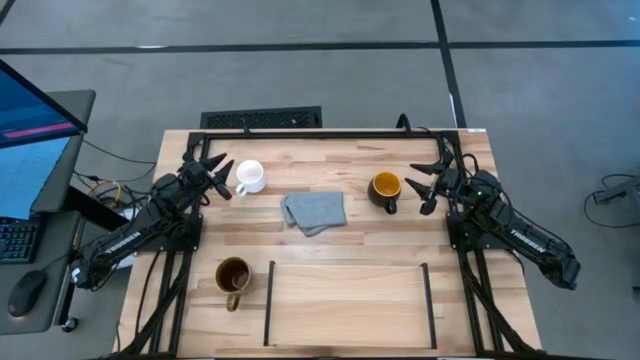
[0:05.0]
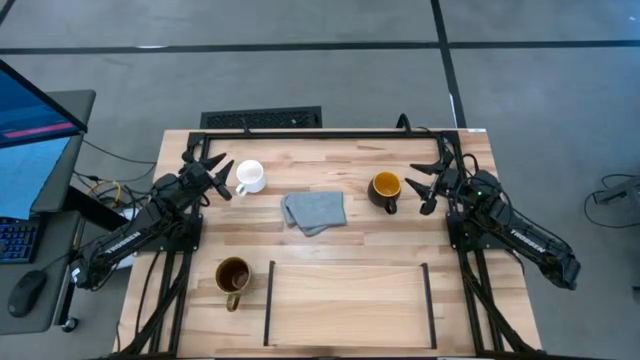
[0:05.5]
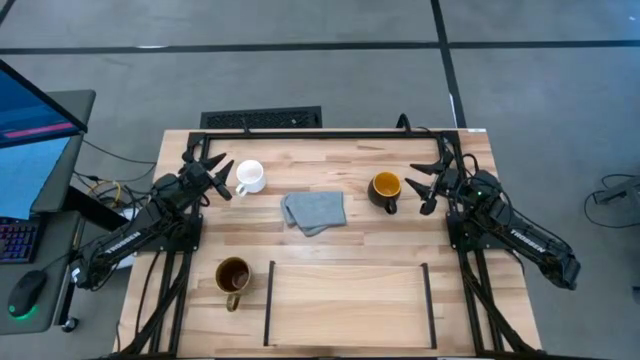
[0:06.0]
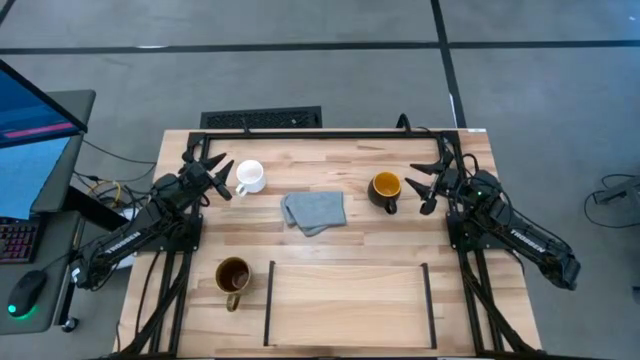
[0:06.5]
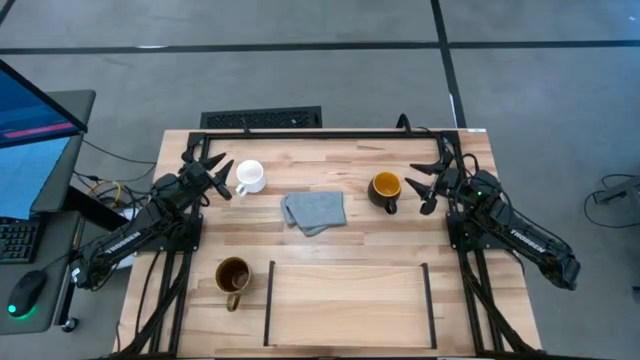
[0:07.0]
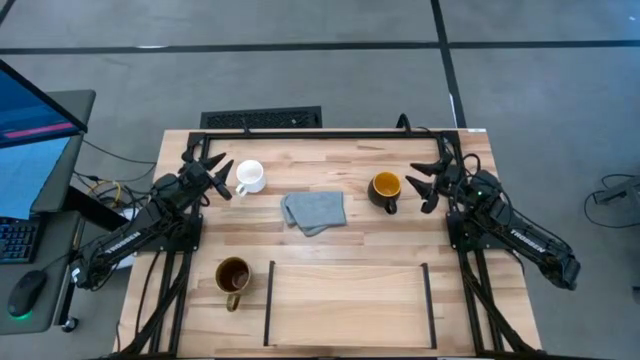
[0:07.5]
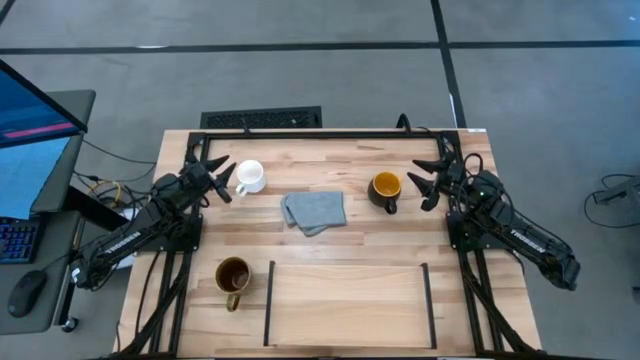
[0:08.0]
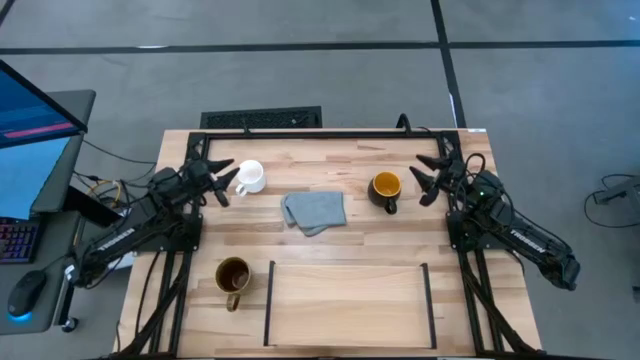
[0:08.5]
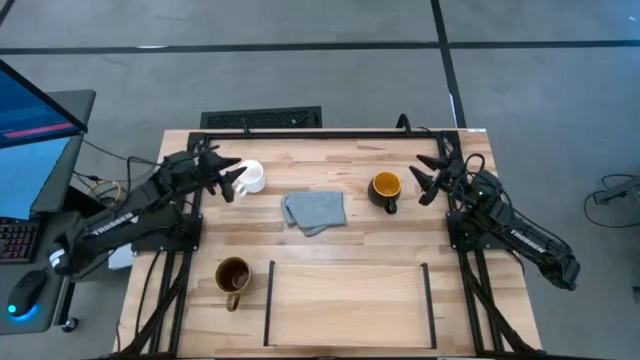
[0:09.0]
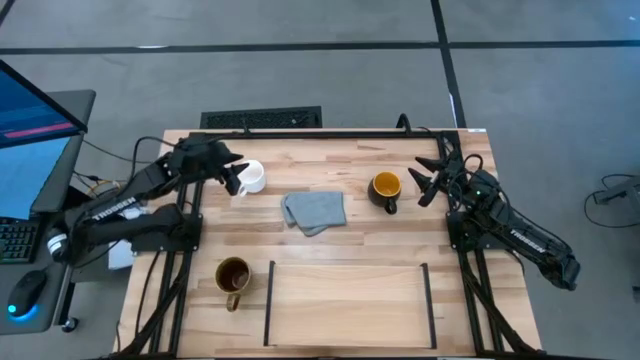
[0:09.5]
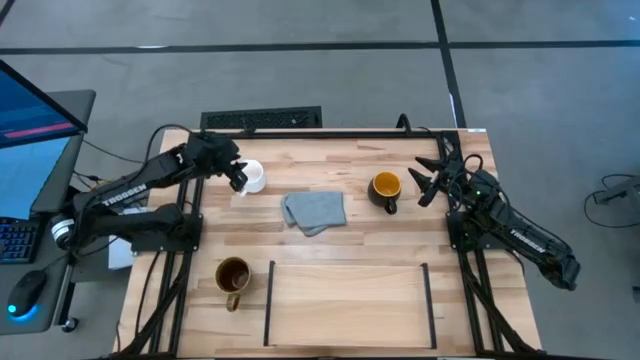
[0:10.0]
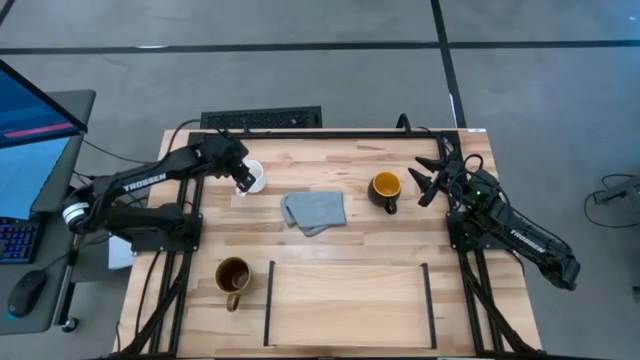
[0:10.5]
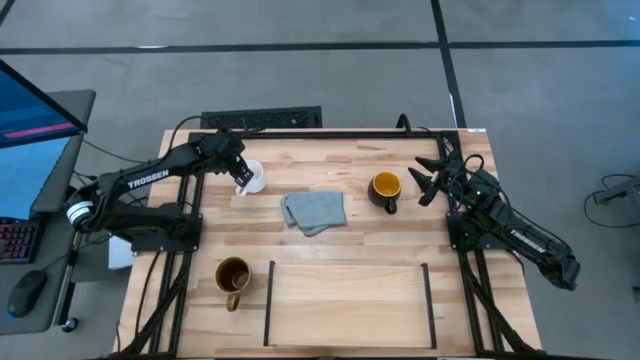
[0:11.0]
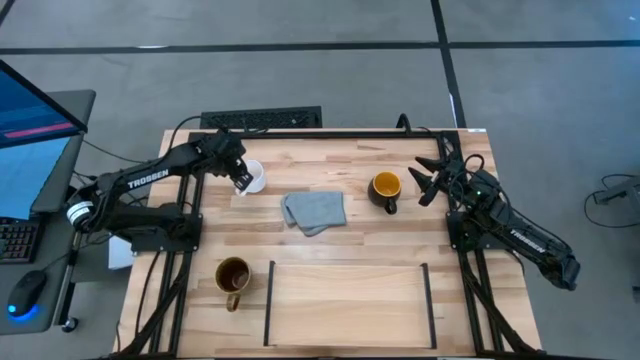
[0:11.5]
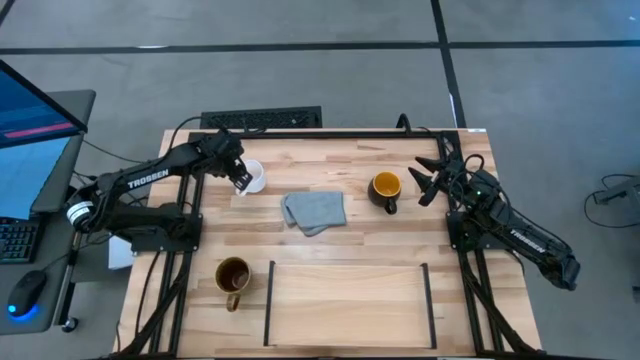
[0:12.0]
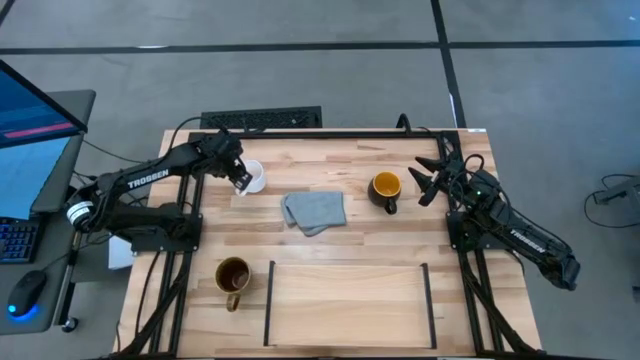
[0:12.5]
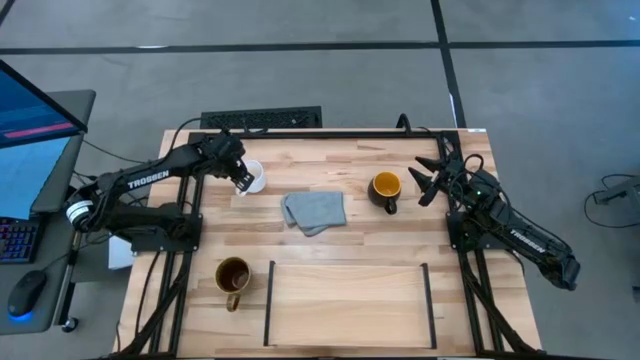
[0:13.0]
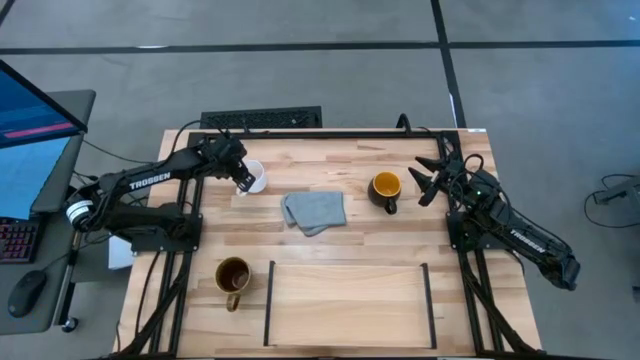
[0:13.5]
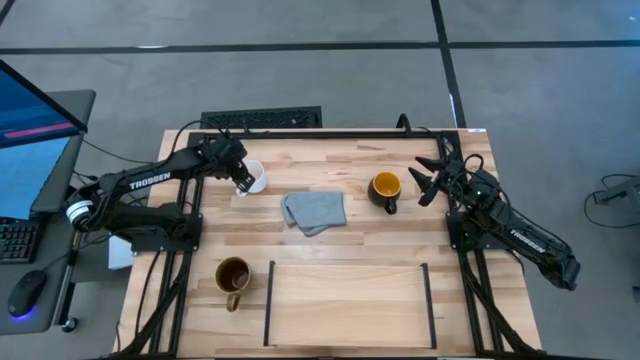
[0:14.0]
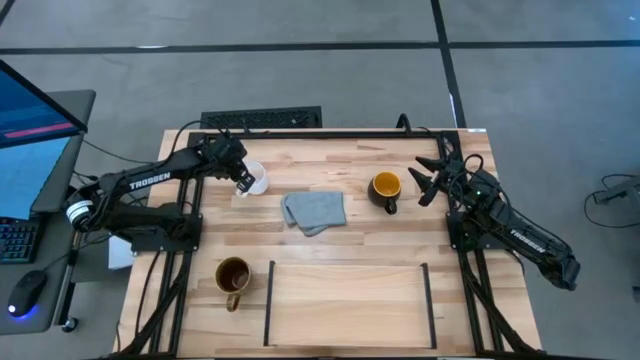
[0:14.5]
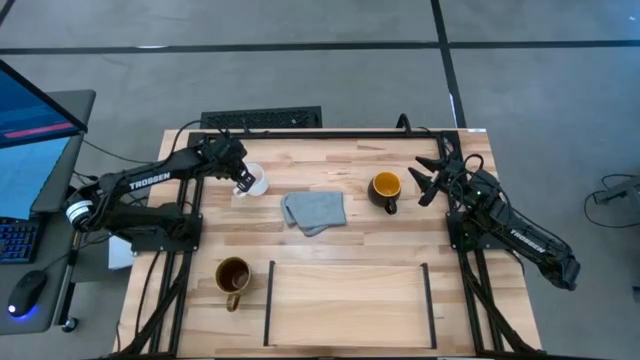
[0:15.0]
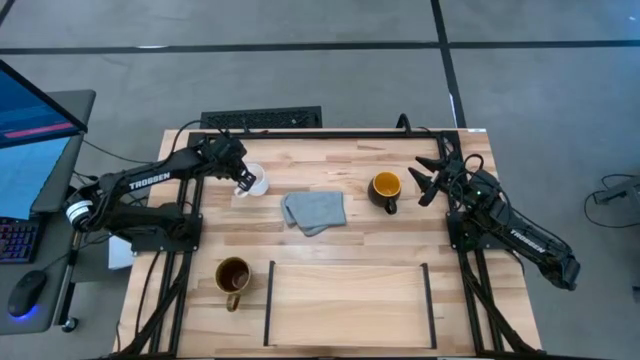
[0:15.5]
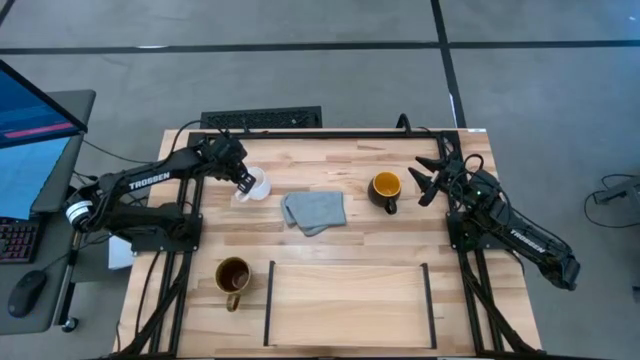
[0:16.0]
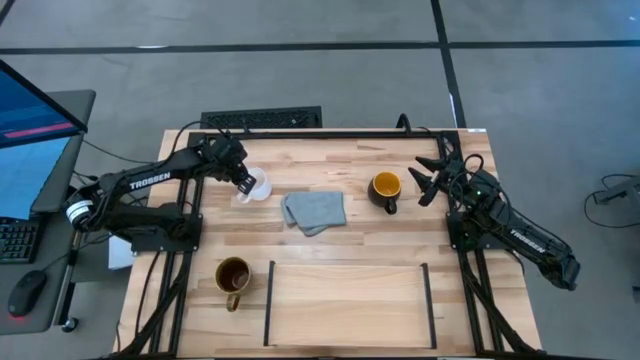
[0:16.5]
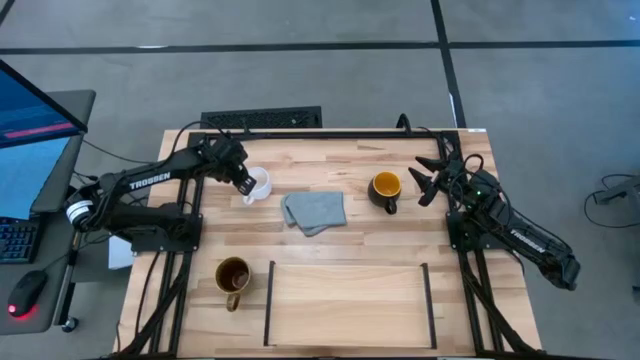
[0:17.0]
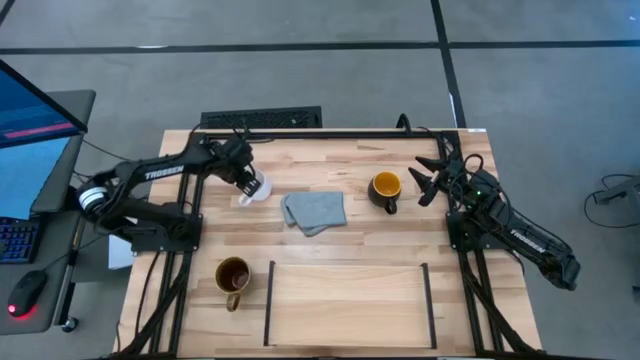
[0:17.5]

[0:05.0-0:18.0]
Task: Stack small to large cups/mugs on shelf
Put the white mug on the shelf

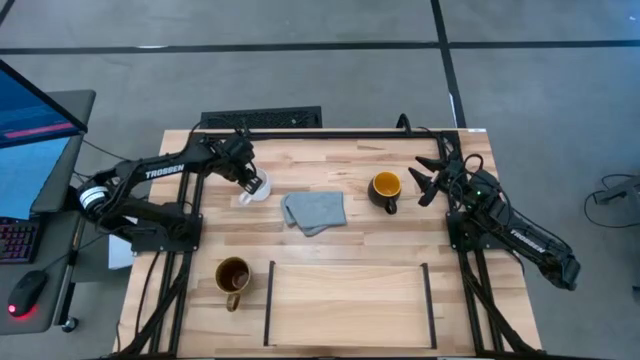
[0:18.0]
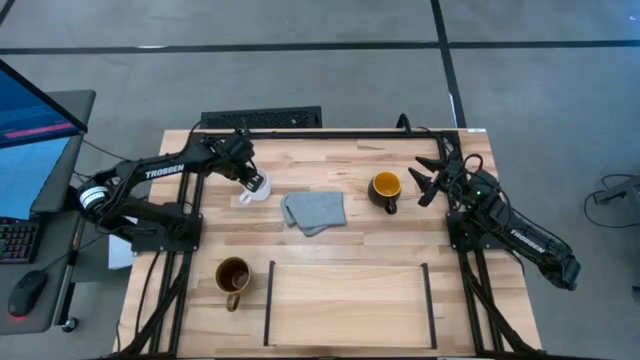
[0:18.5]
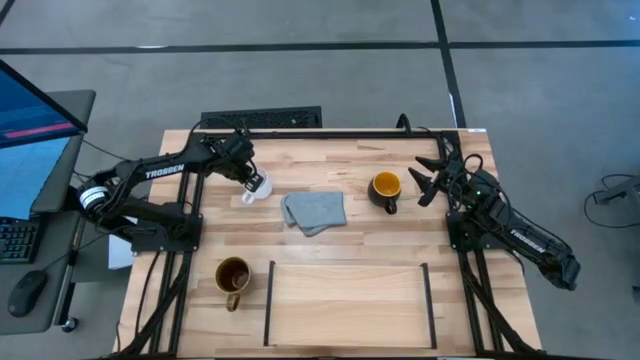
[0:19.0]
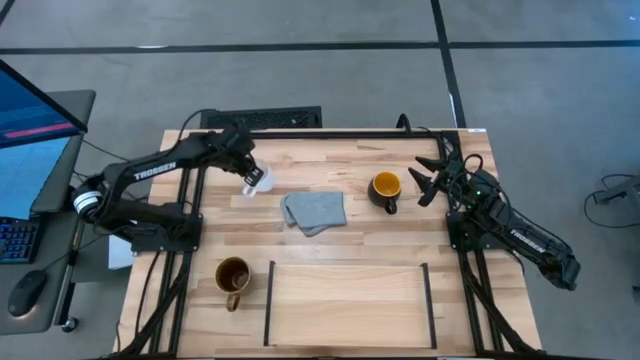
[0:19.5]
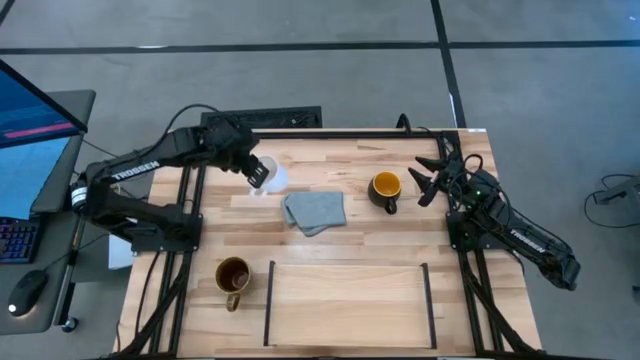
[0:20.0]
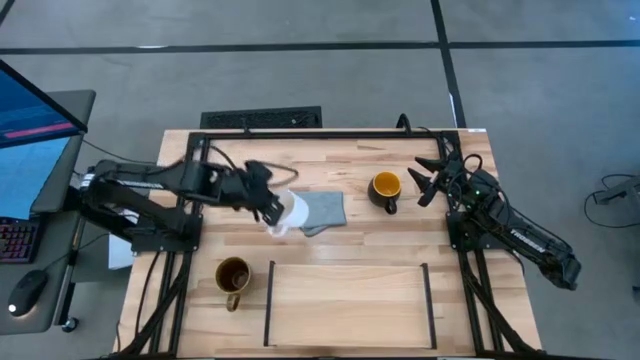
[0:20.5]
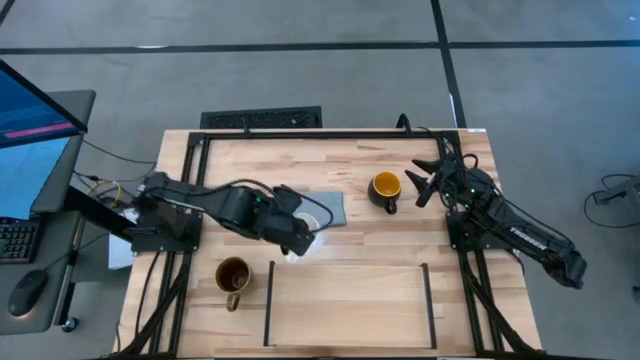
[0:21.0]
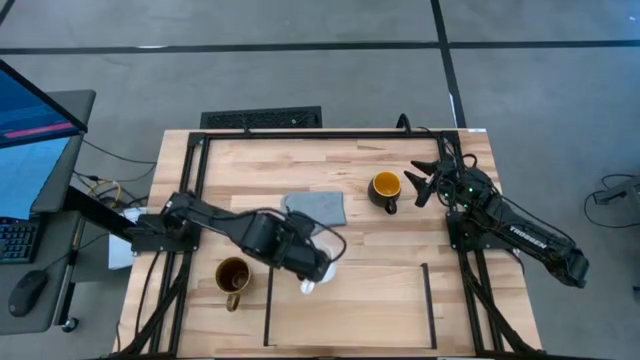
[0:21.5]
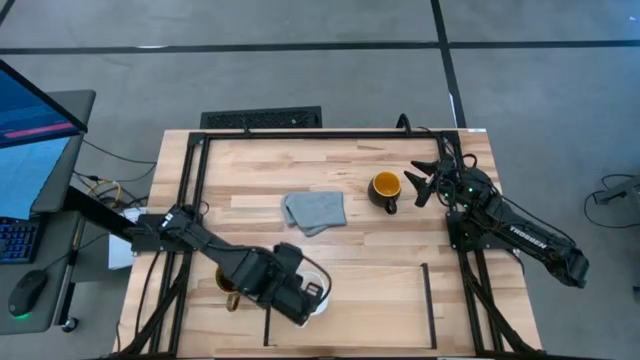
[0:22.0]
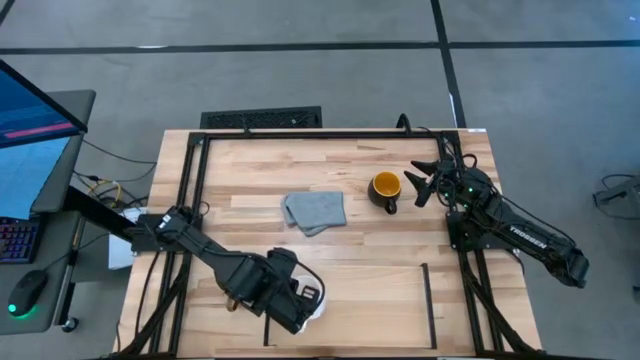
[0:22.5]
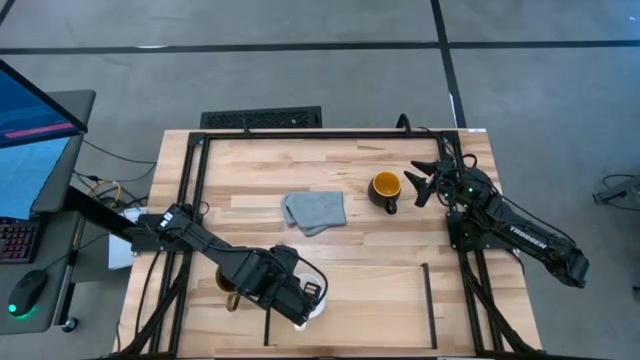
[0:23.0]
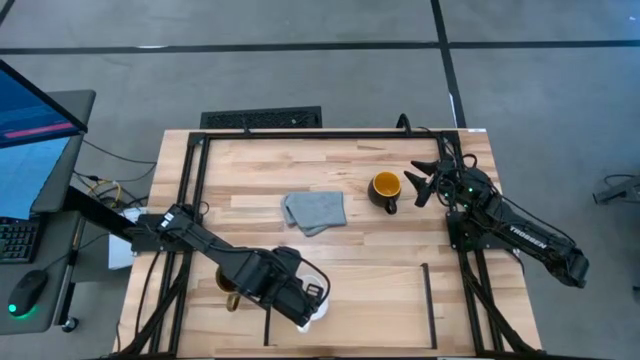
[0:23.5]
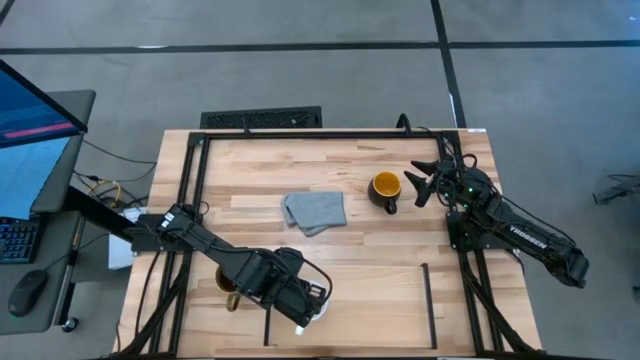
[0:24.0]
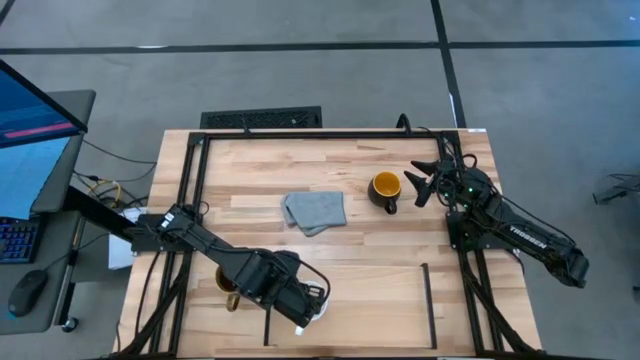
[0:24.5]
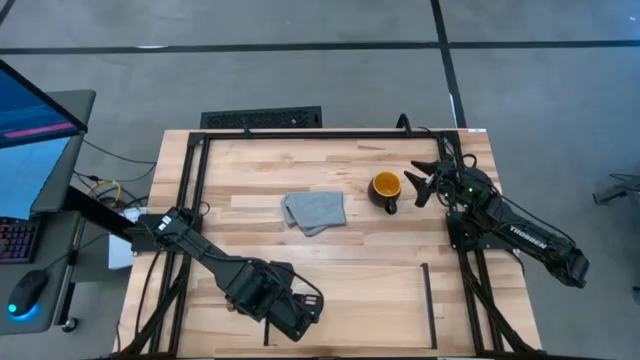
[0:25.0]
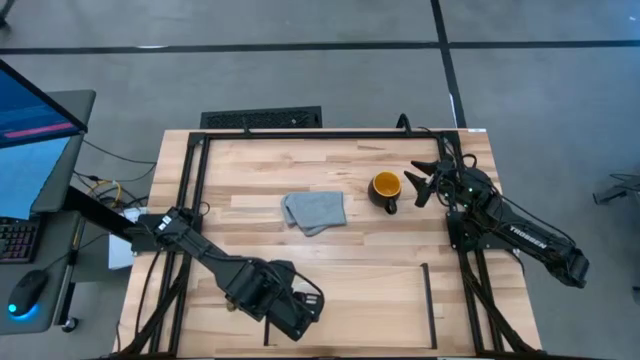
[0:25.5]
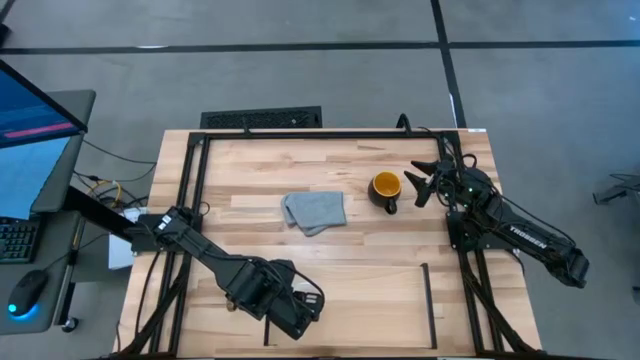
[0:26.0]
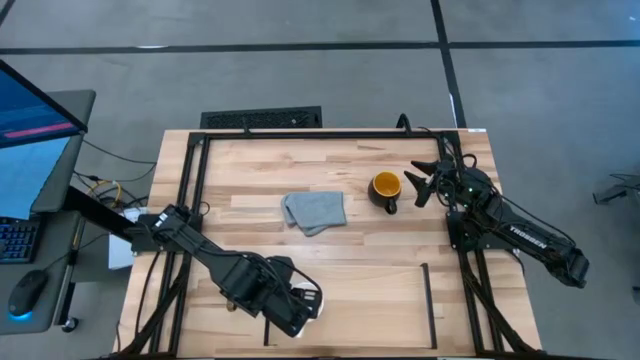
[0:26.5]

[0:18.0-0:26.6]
Put the white mug on the shelf
